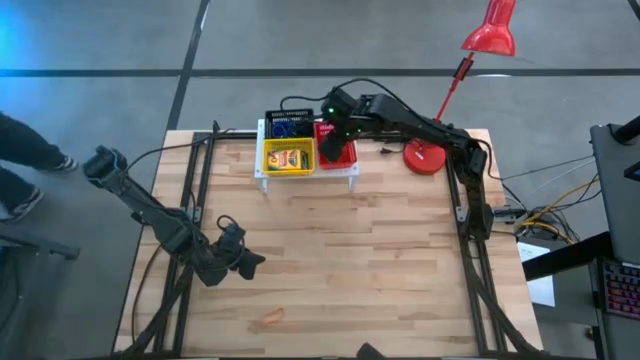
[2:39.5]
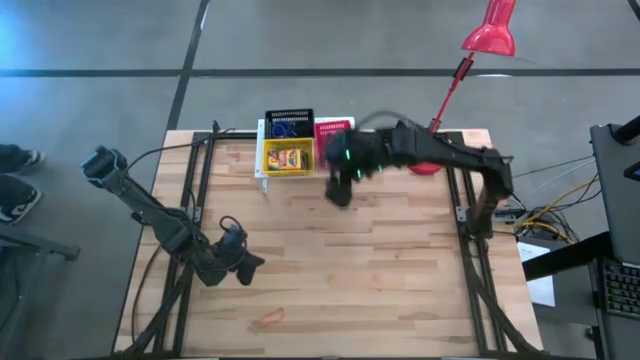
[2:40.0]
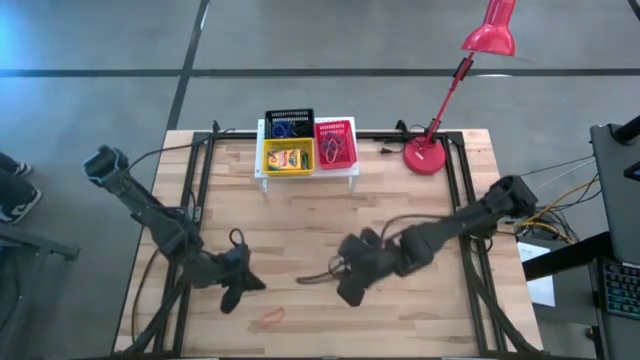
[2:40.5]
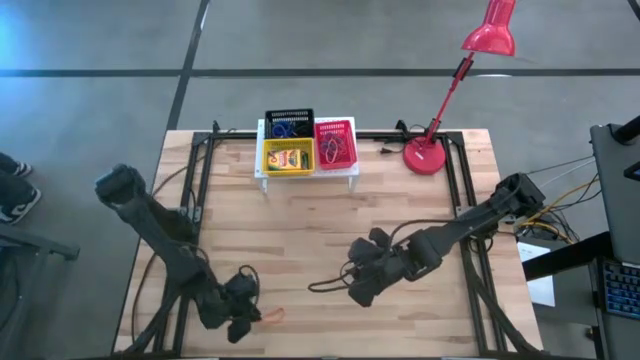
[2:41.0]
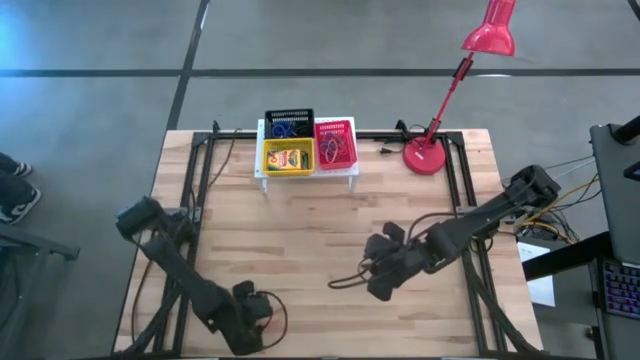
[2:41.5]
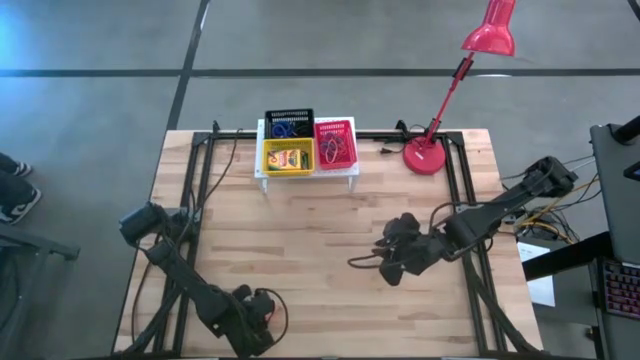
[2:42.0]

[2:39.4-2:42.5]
Task: Pick & Place Office Desk Supplies
Put the orange rubber band into the red basket on the shelf

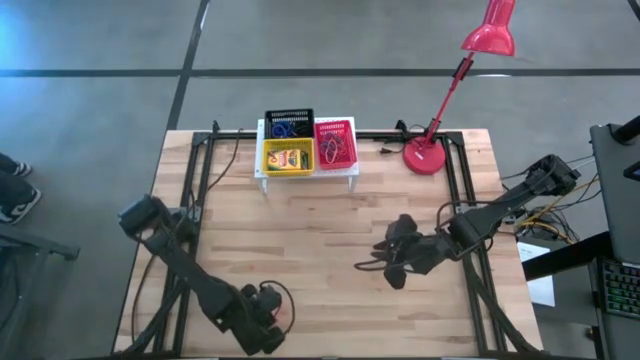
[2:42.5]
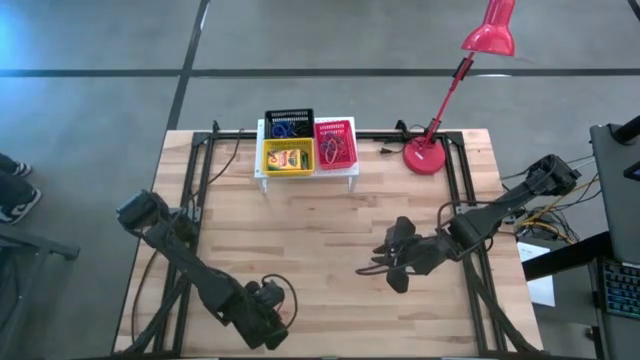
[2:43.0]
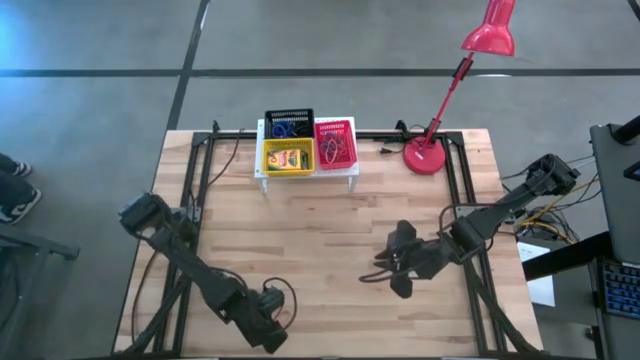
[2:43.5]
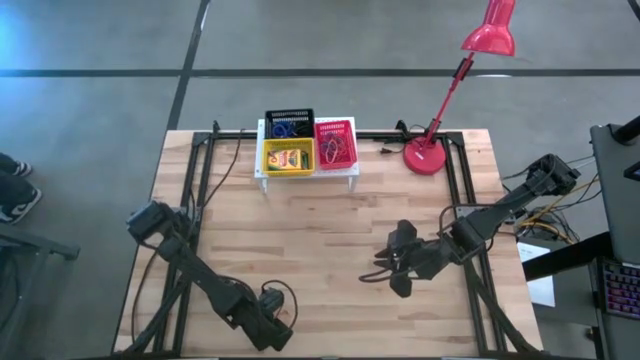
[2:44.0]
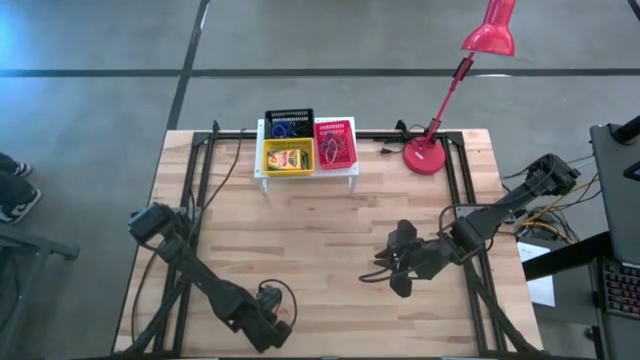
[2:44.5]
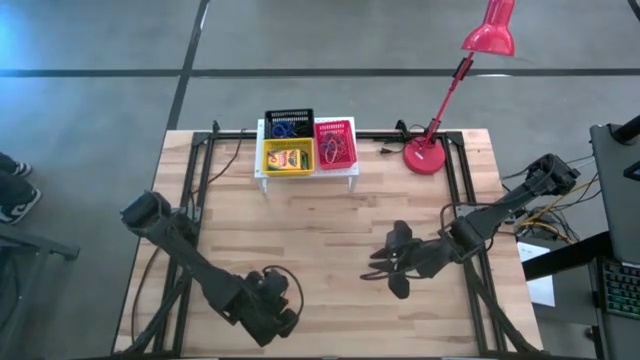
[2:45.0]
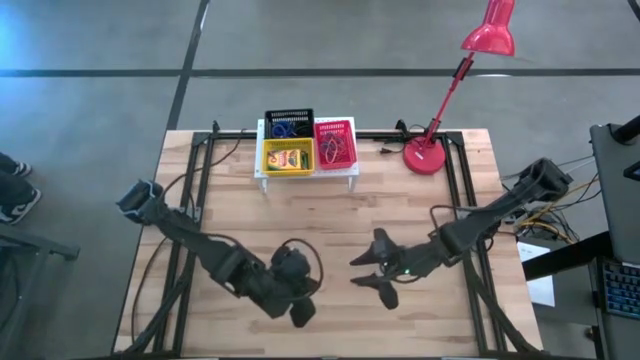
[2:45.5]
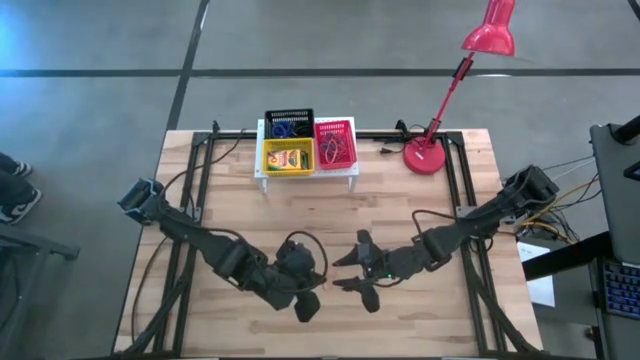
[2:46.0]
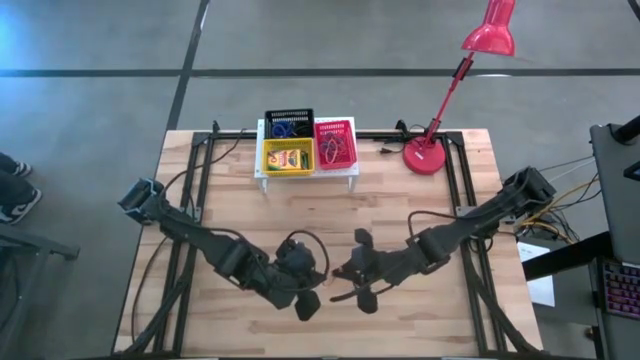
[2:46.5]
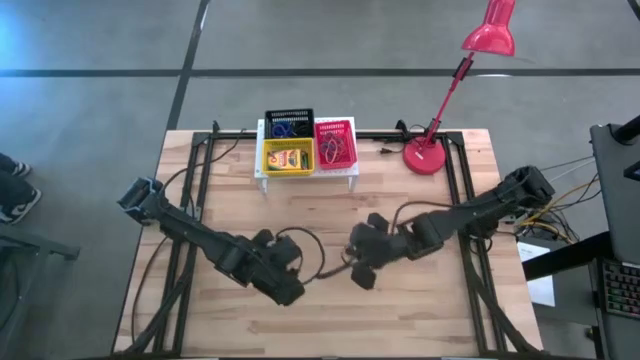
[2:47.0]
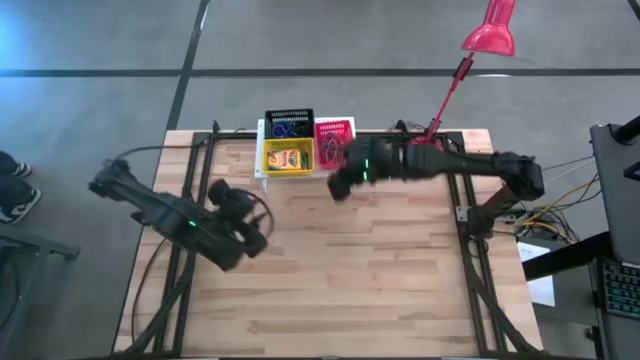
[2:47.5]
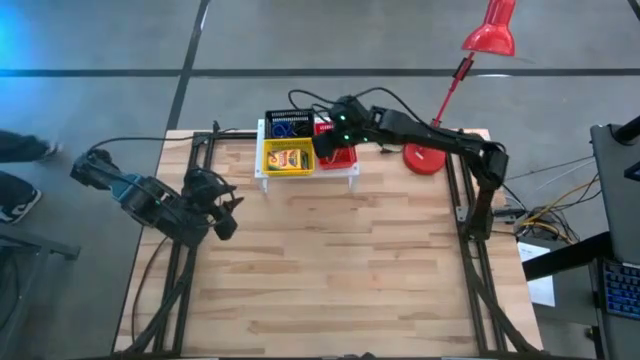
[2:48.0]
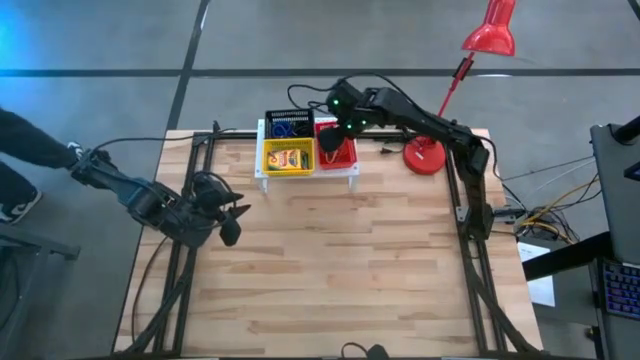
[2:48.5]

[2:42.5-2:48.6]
Put the orange rubber band into the red basket on the shelf

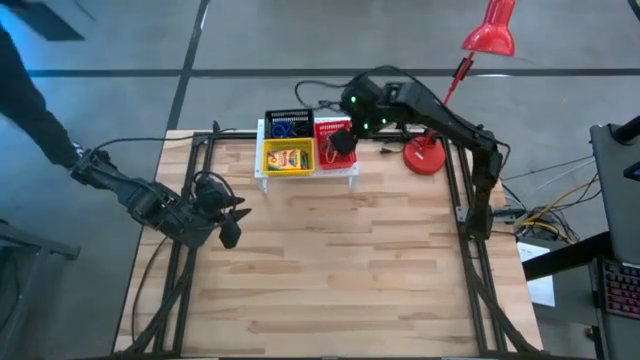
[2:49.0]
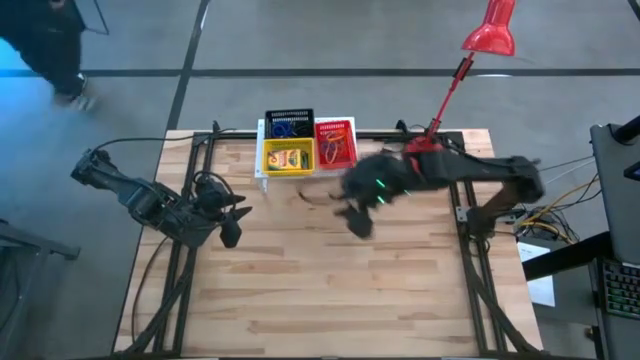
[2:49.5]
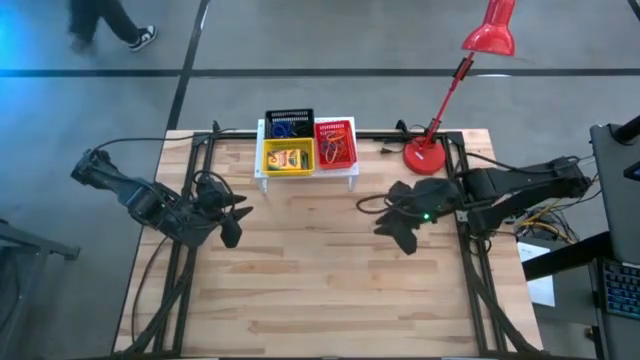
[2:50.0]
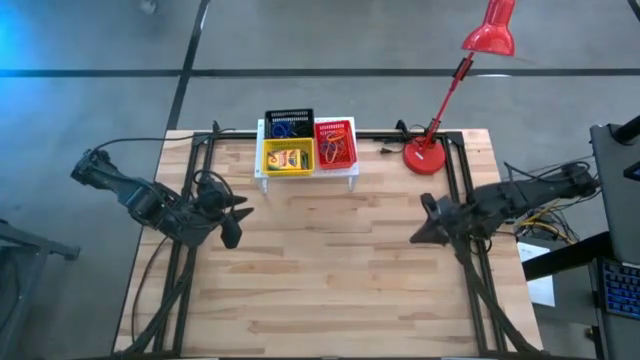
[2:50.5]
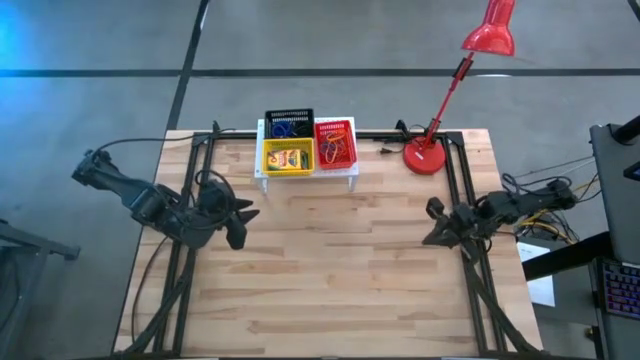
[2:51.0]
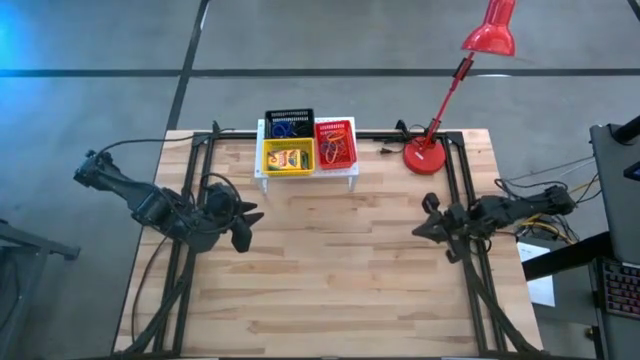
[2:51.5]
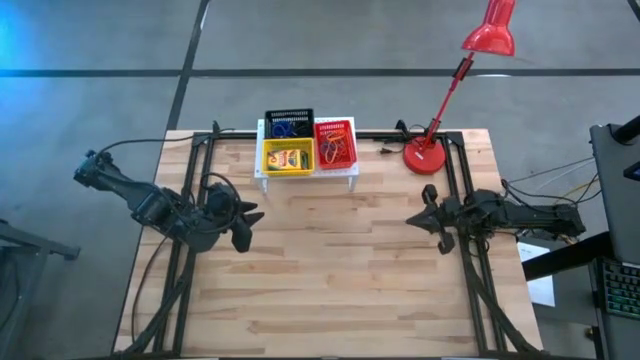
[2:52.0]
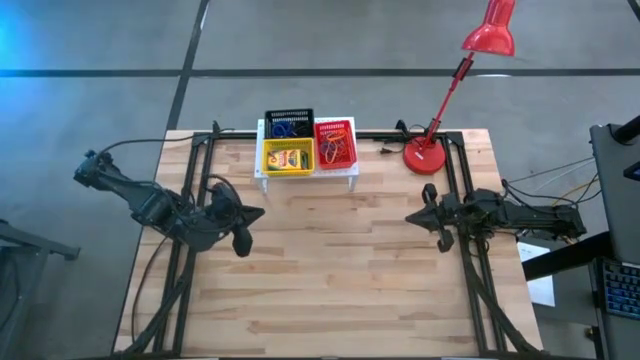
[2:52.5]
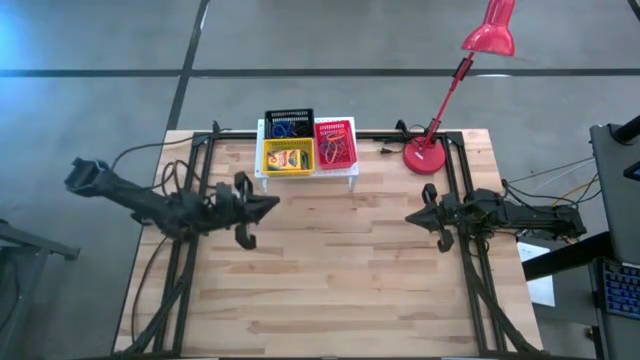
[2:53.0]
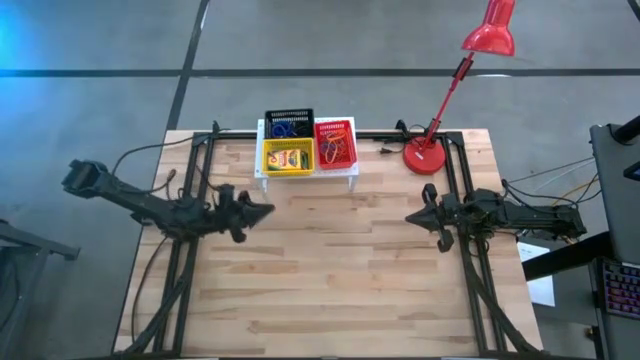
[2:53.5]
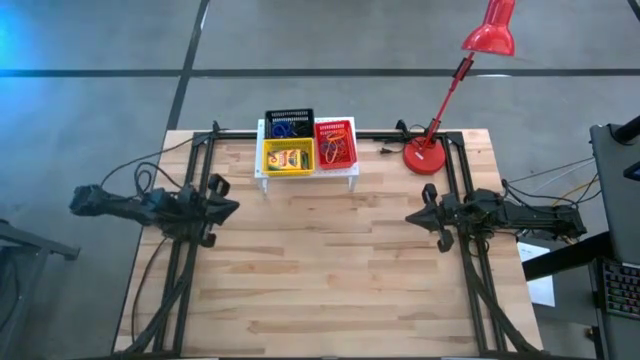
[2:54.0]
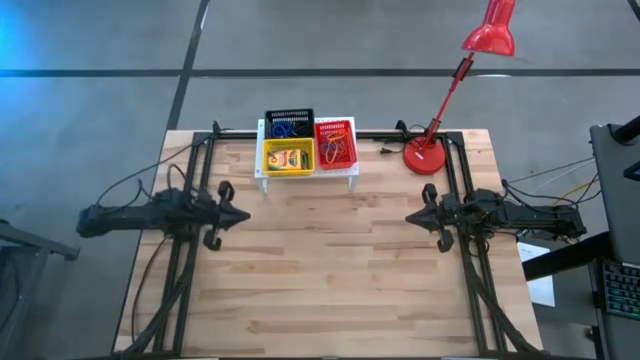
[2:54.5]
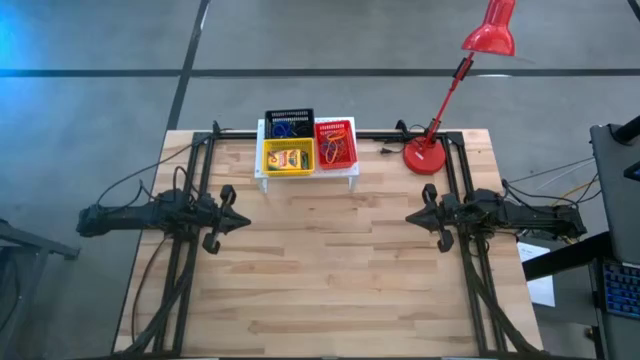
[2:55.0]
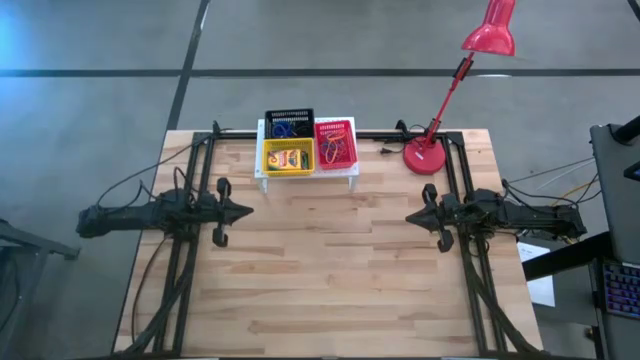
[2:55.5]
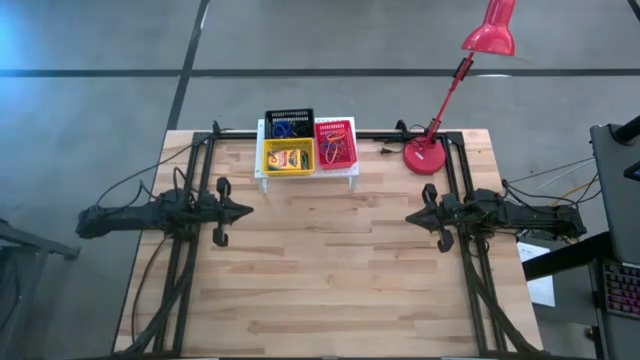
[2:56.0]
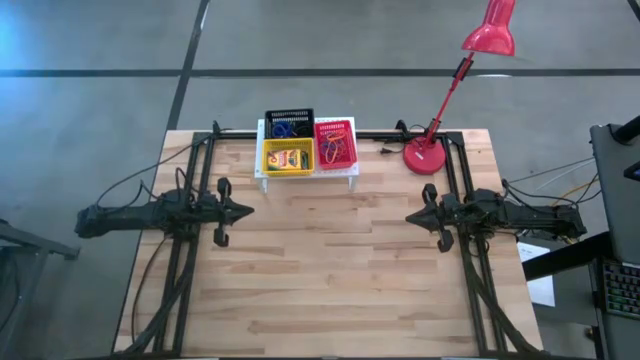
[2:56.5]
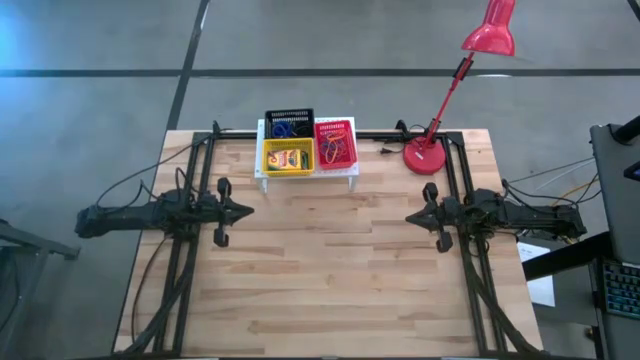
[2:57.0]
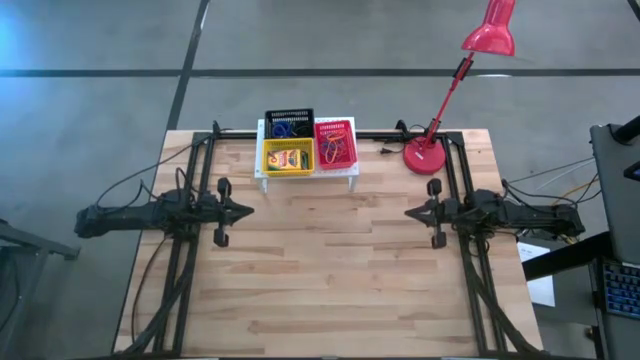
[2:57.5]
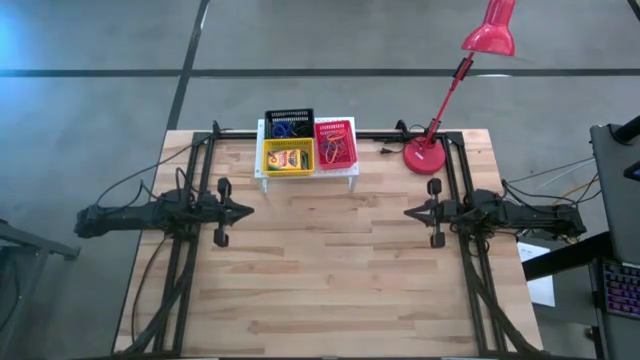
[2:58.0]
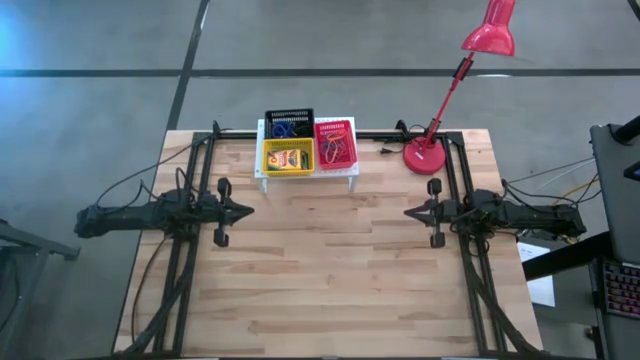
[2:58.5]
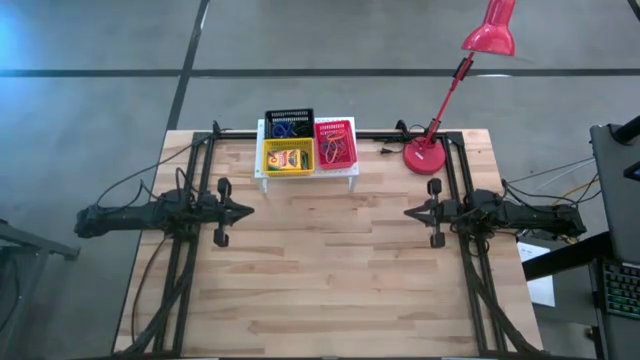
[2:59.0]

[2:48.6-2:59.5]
Return to Home Position
